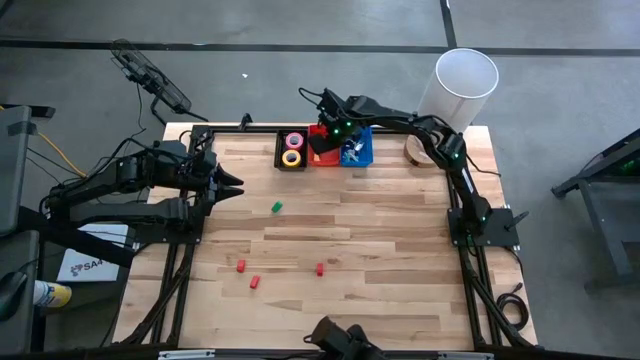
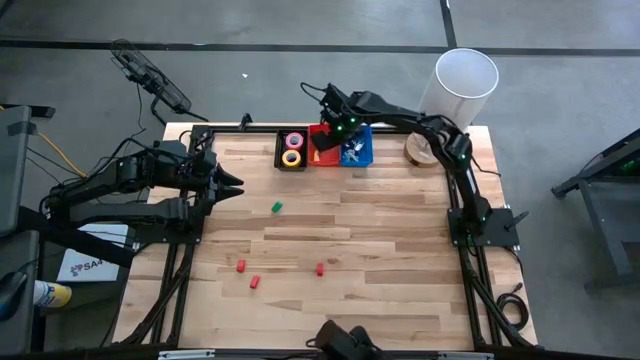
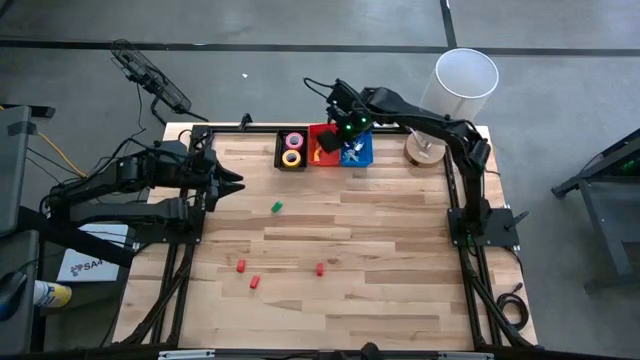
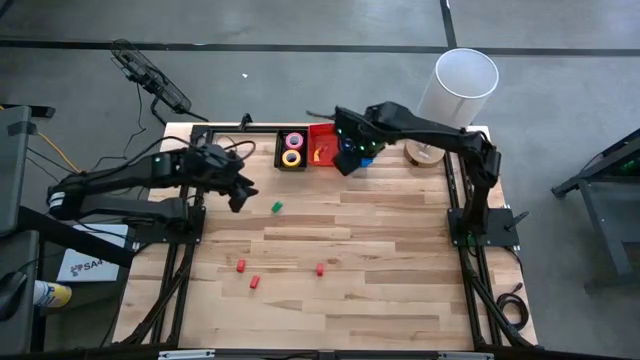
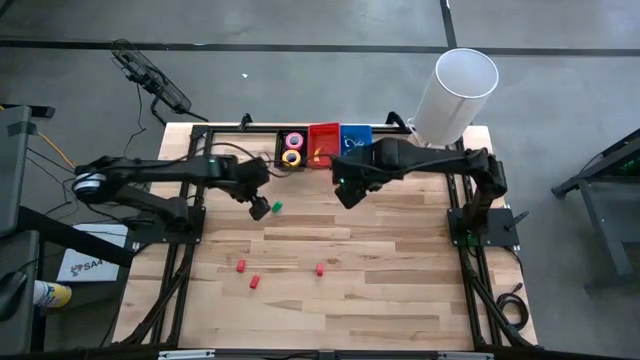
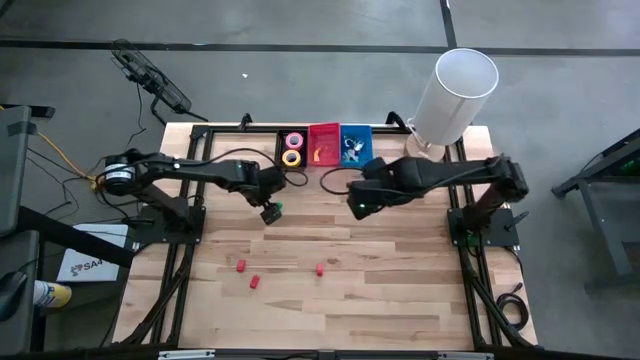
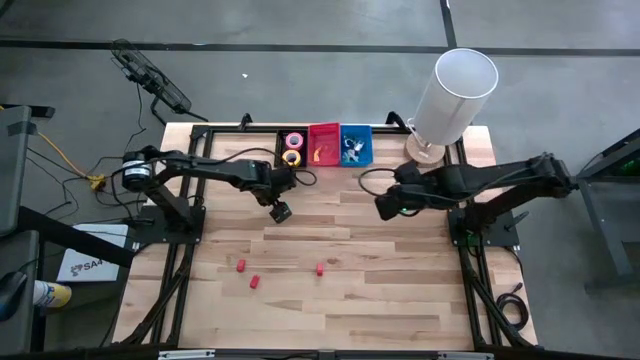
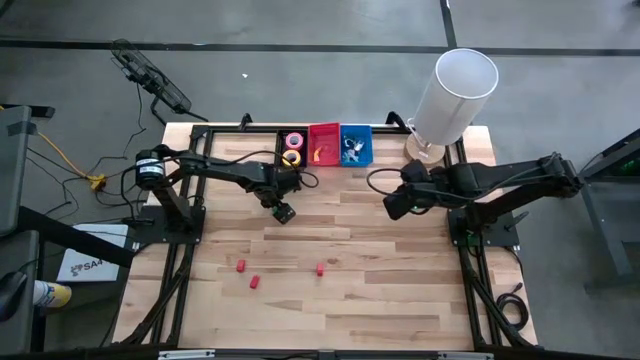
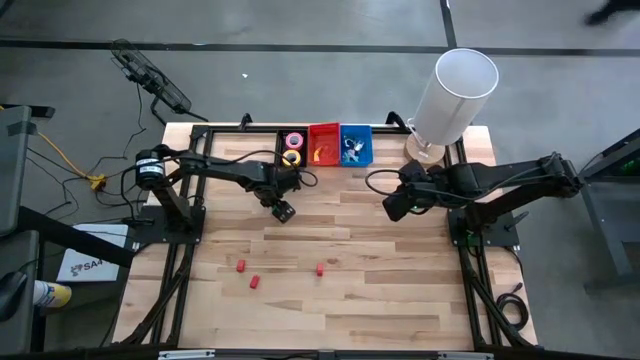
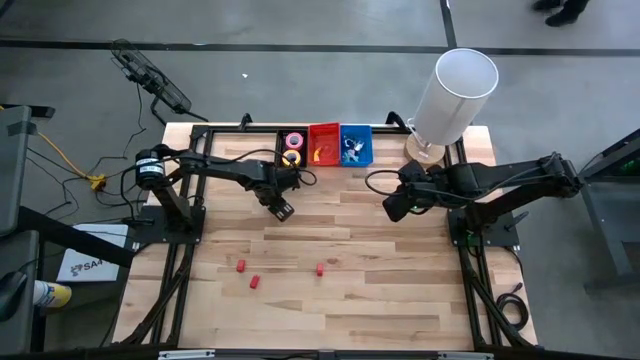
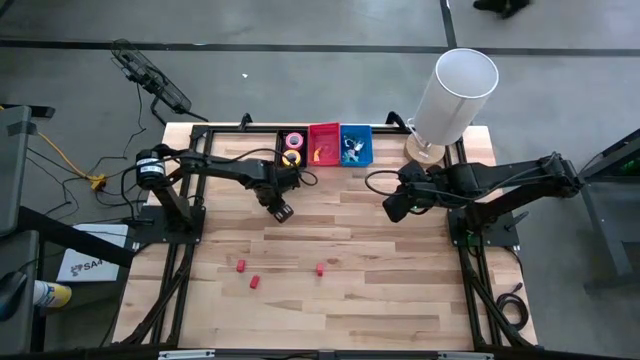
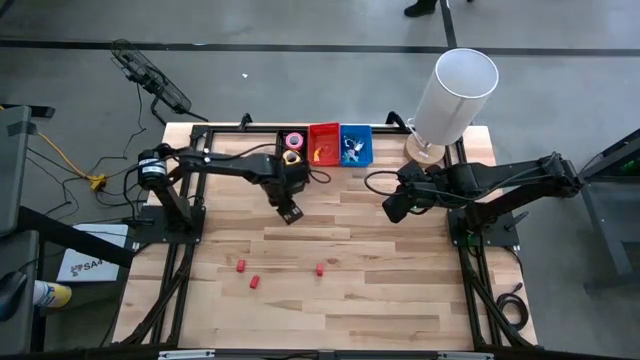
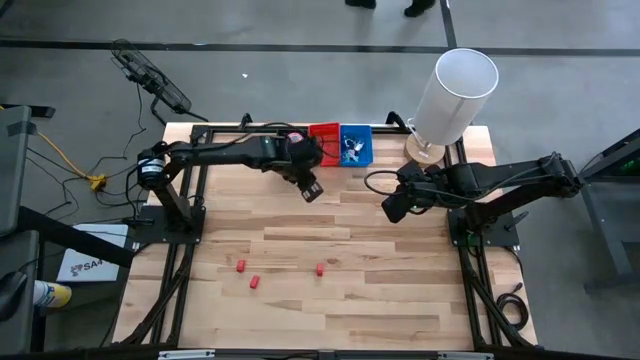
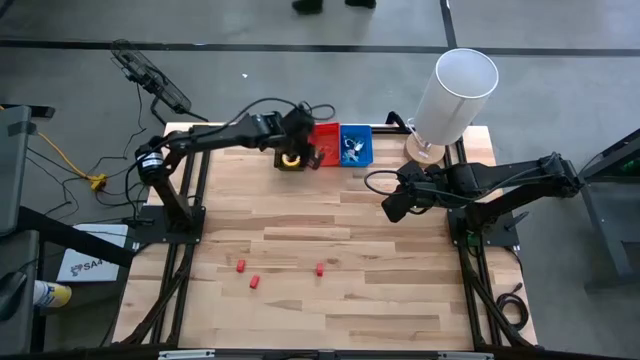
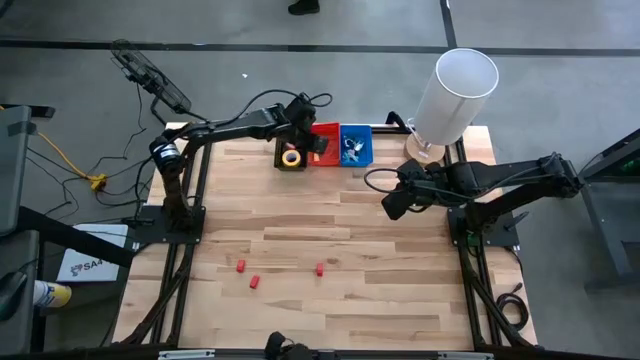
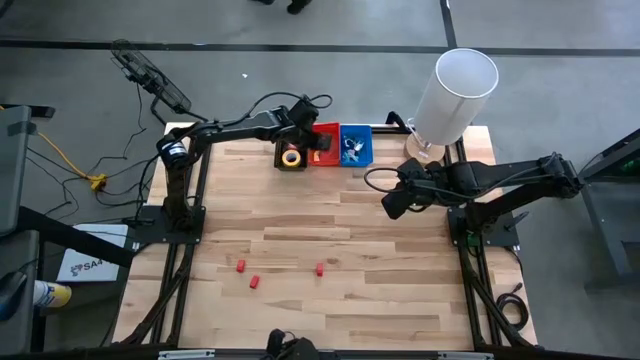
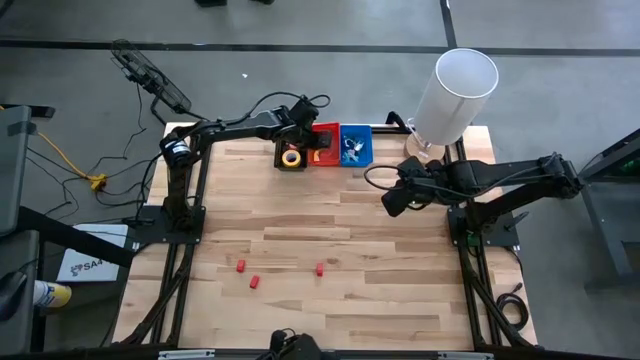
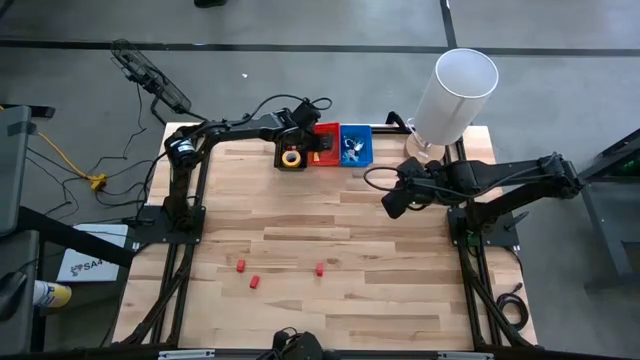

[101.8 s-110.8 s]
Task: Pick and place Stapler, Stapler remover, tape
Put the green stapler into the red bin

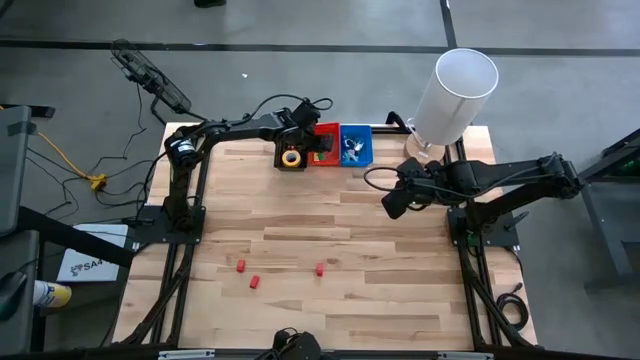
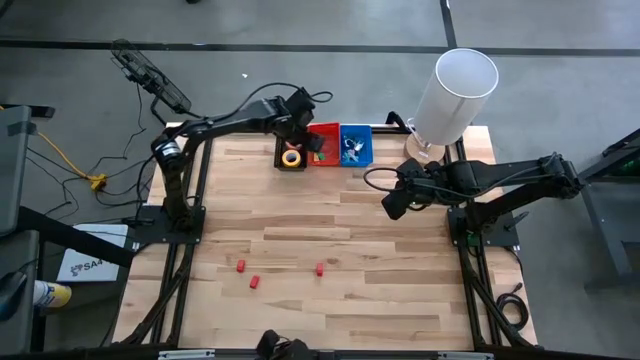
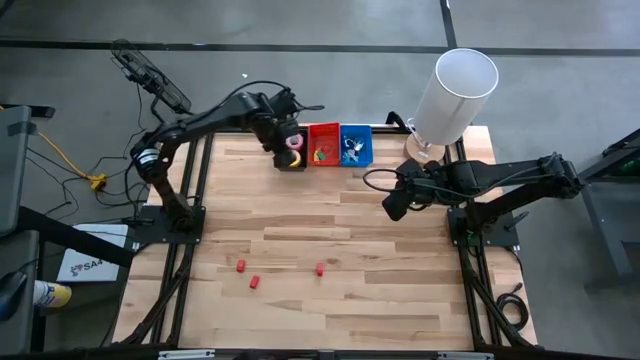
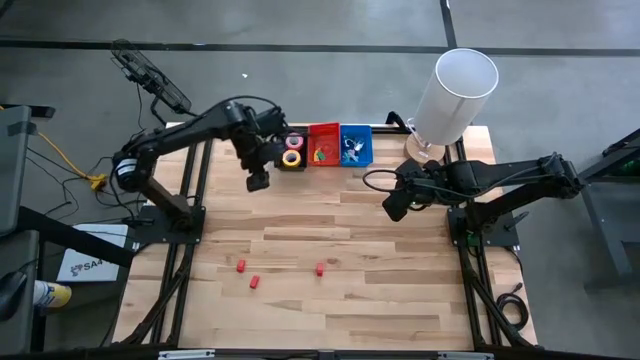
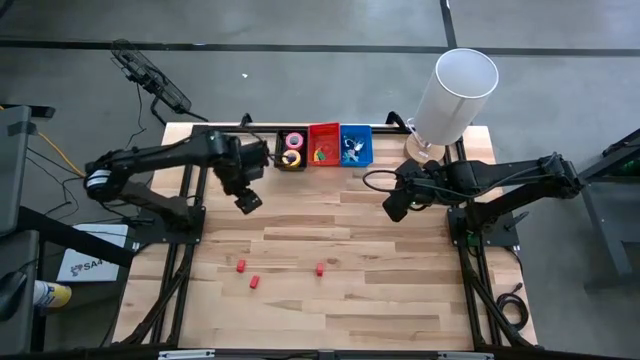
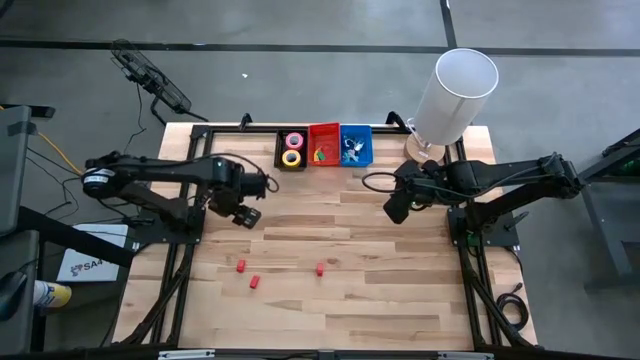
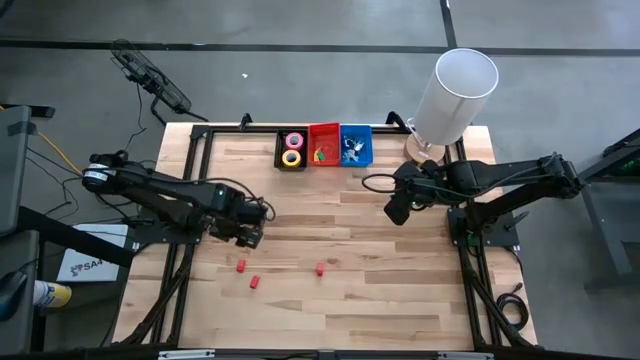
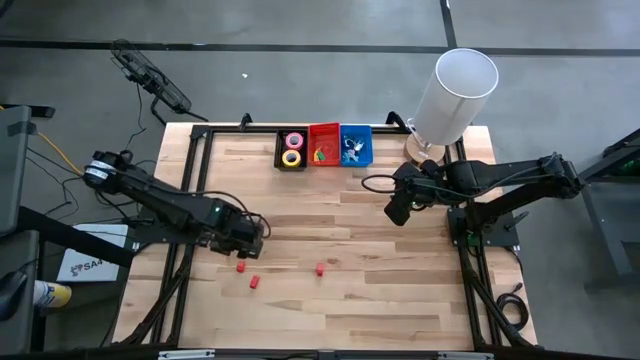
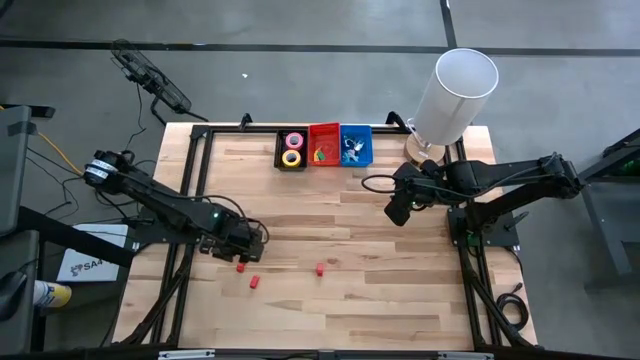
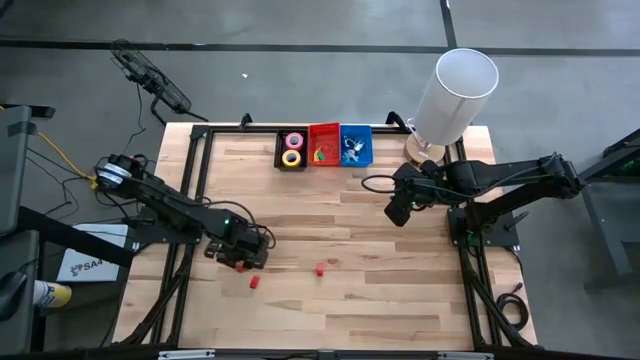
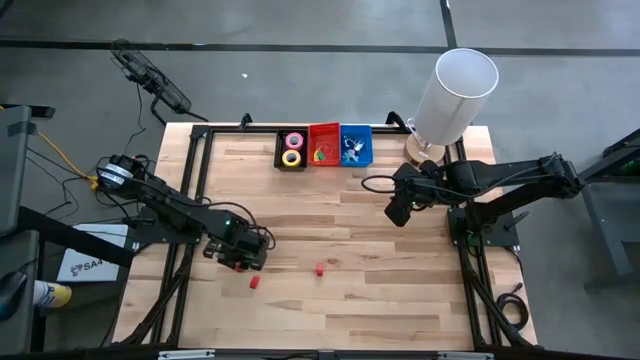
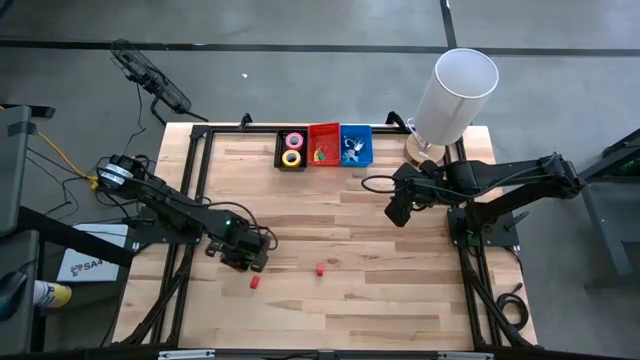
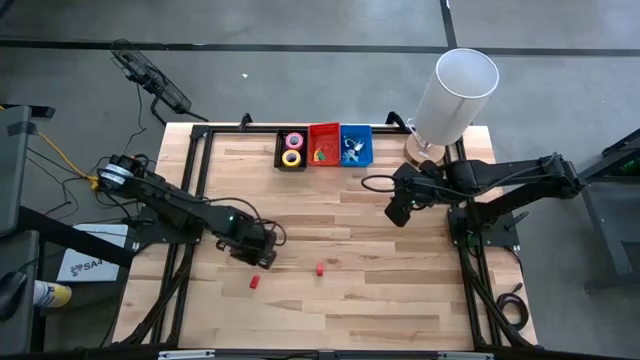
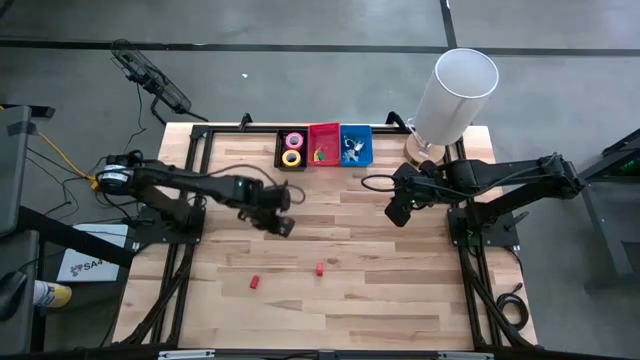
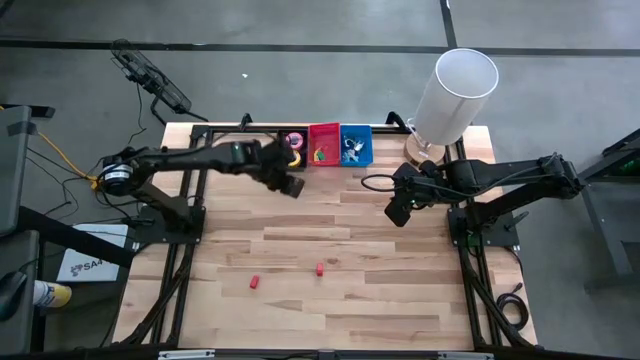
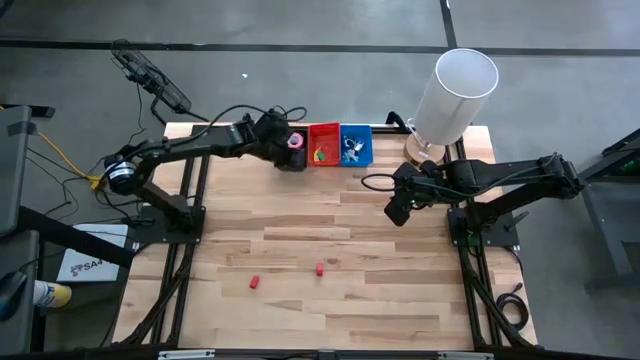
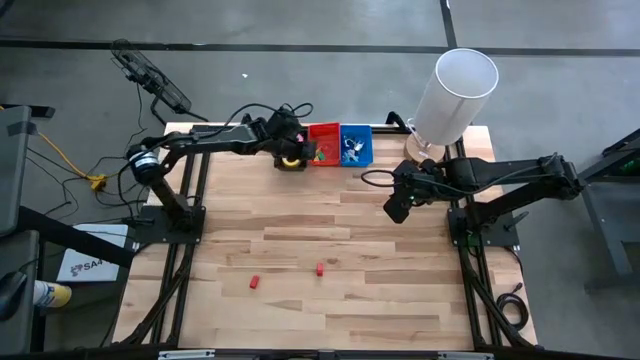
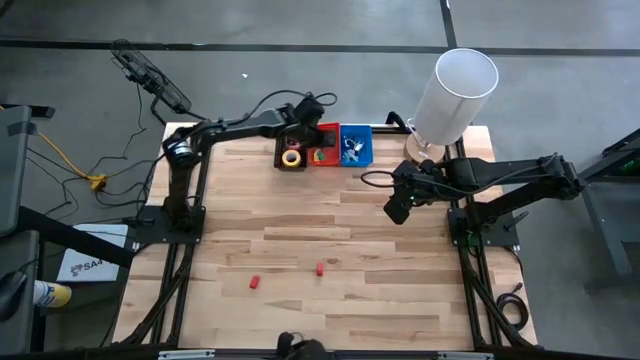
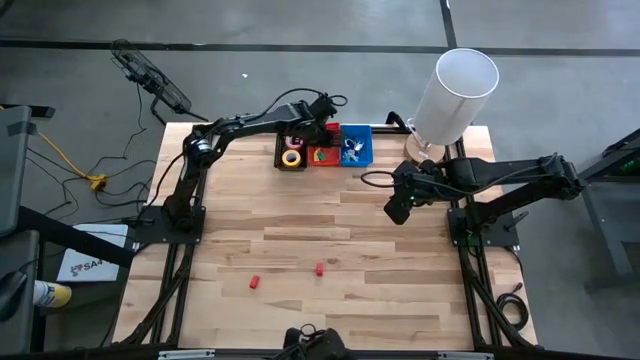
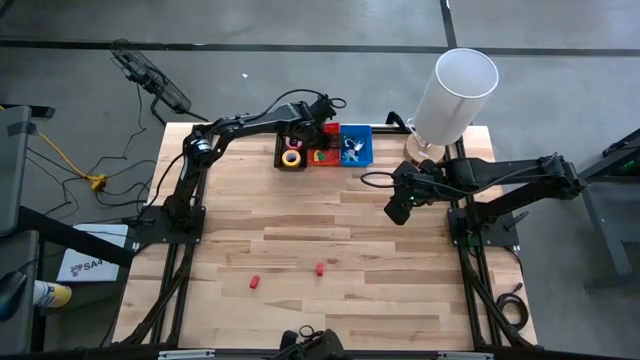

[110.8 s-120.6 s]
Put the red stapler into the red bin

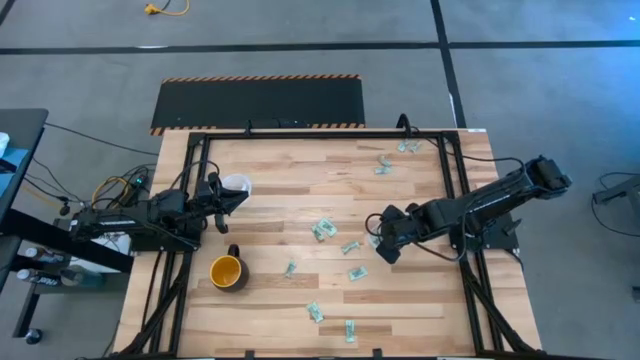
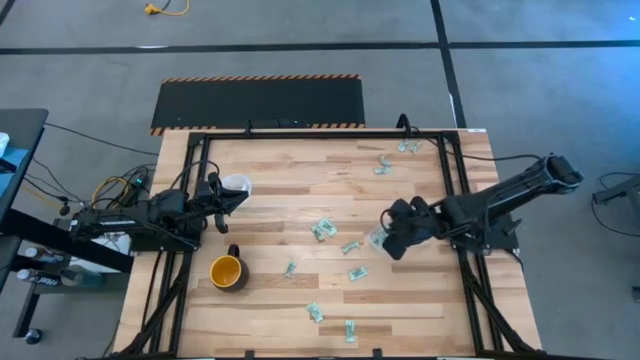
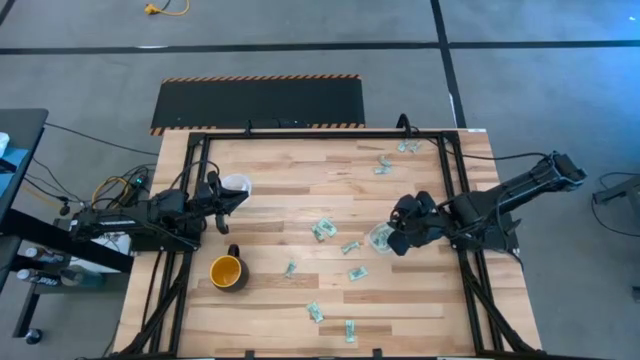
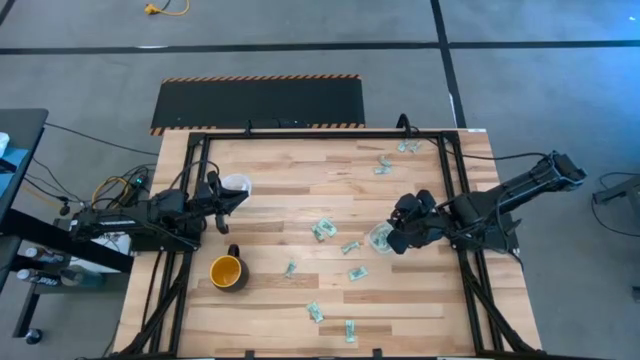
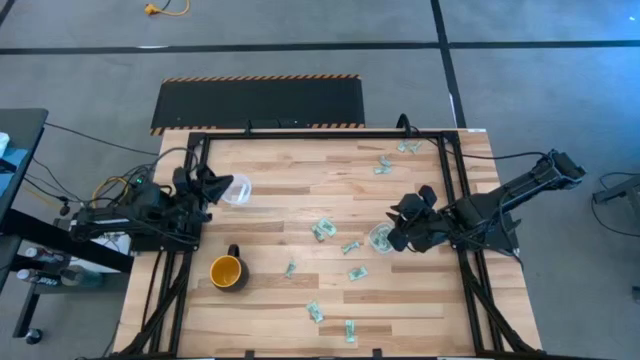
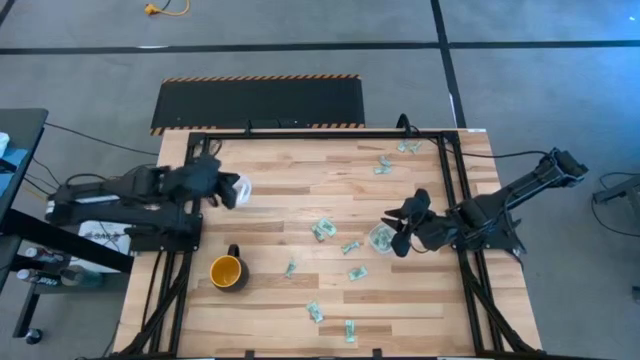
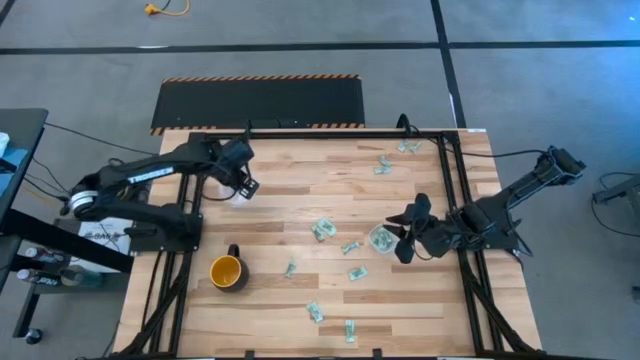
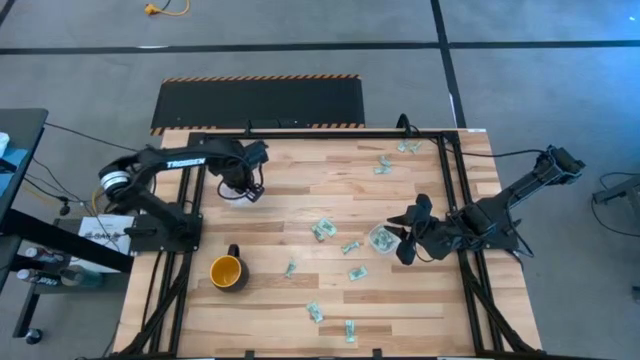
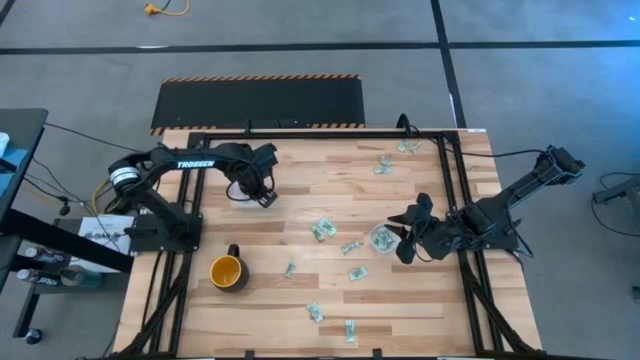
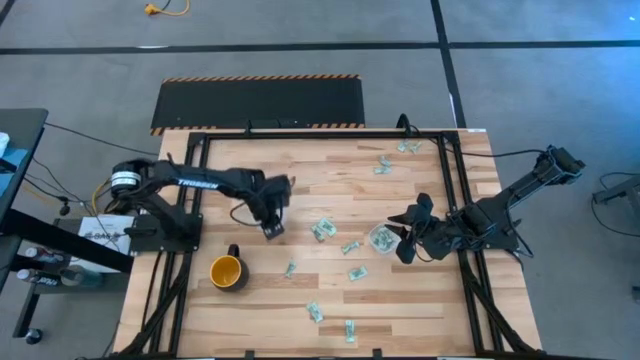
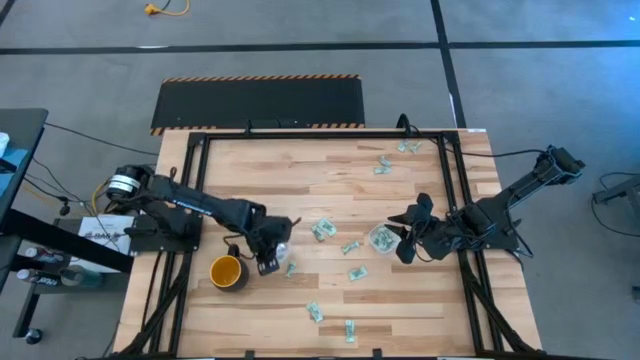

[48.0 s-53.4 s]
Task: Pick and place Stevia / Truvia into bins
Move the round transparent container to the middle left of the table
